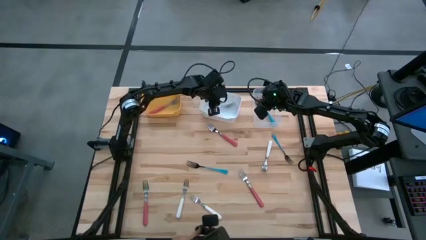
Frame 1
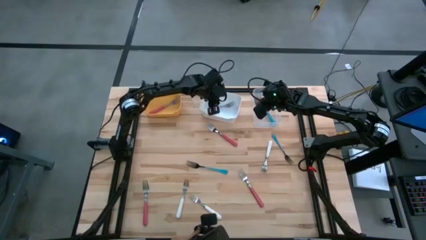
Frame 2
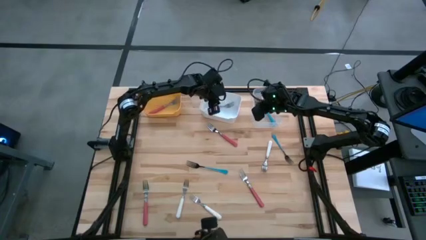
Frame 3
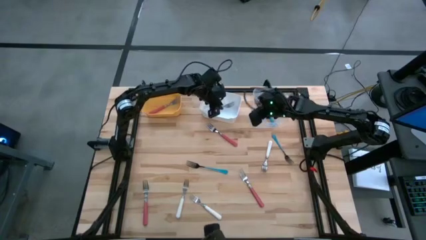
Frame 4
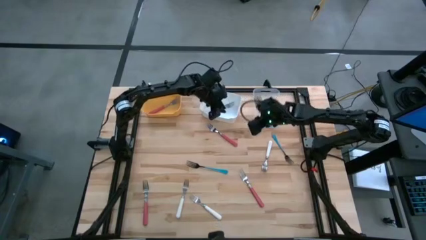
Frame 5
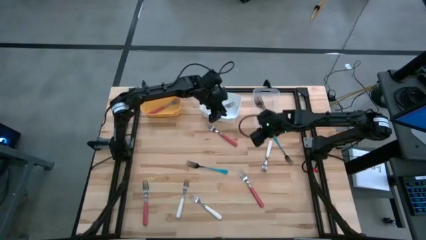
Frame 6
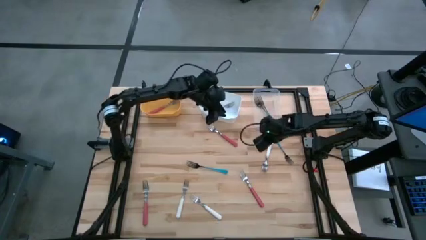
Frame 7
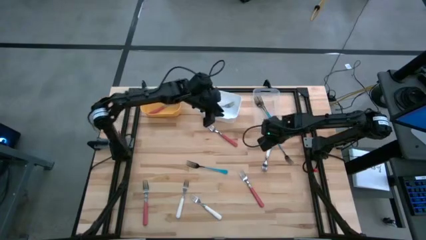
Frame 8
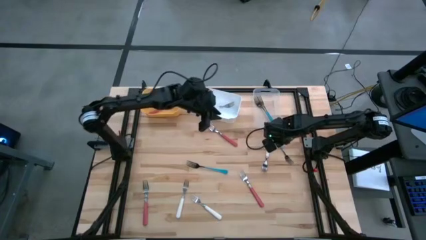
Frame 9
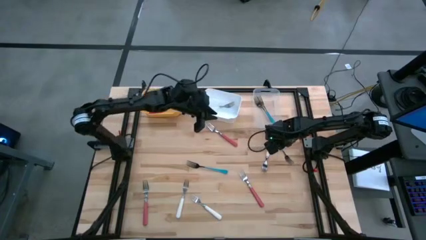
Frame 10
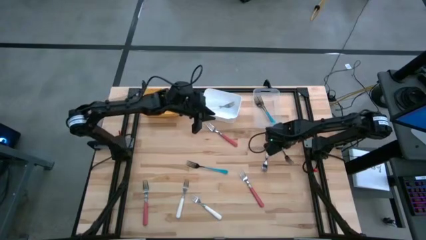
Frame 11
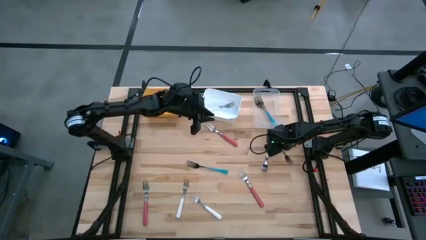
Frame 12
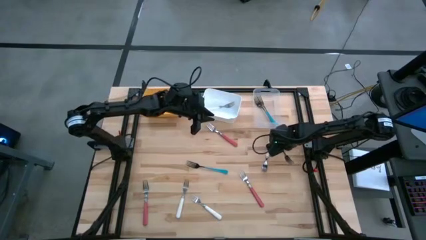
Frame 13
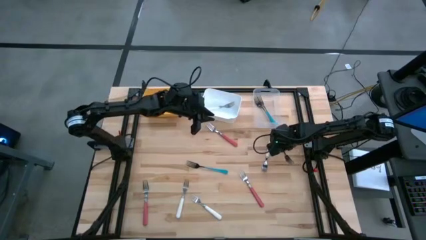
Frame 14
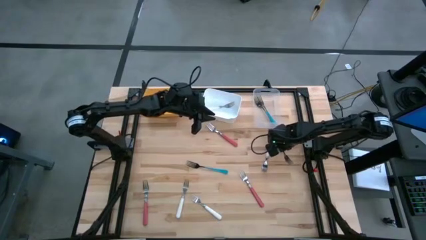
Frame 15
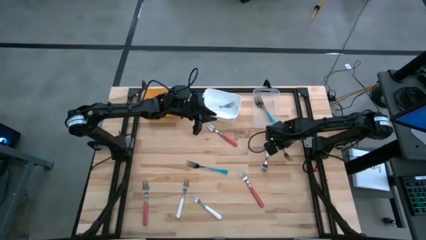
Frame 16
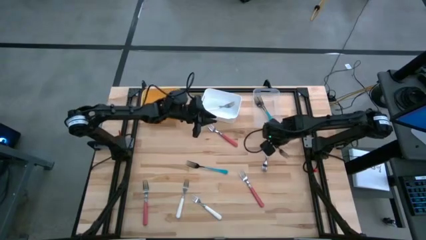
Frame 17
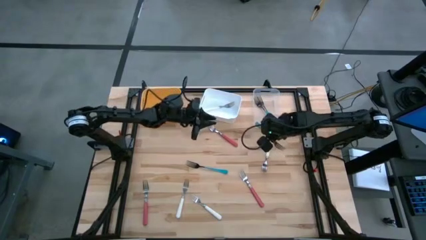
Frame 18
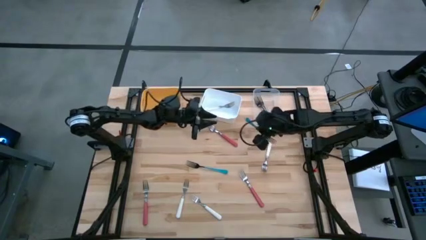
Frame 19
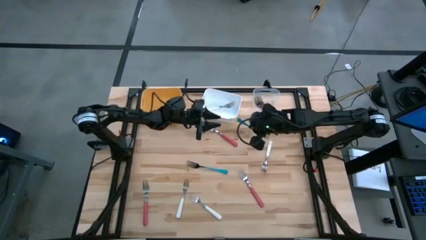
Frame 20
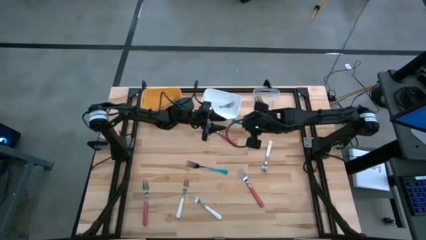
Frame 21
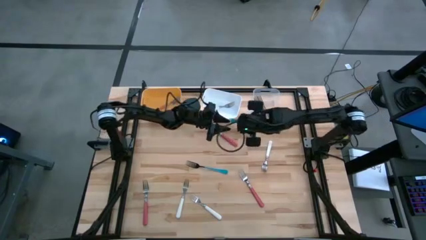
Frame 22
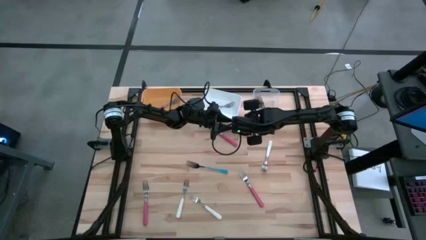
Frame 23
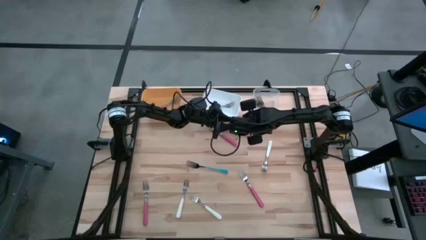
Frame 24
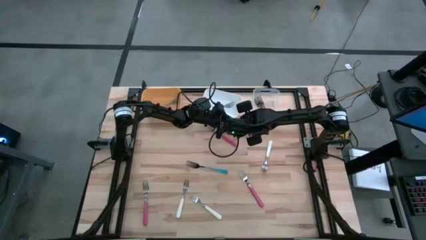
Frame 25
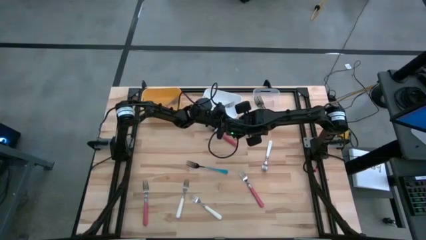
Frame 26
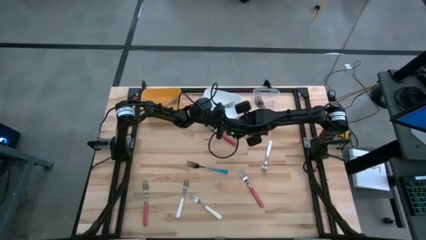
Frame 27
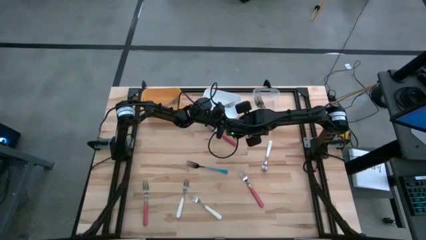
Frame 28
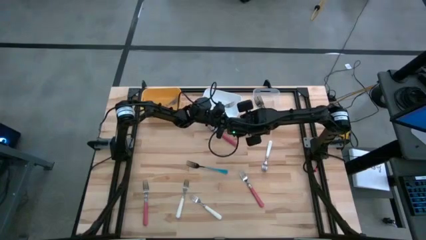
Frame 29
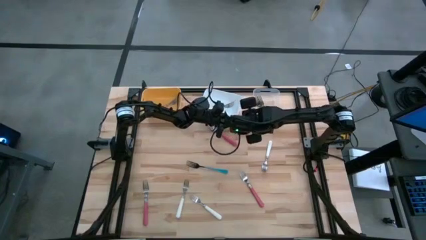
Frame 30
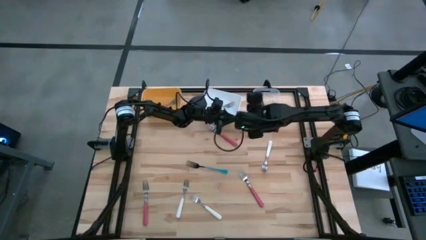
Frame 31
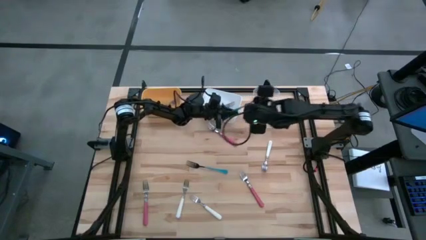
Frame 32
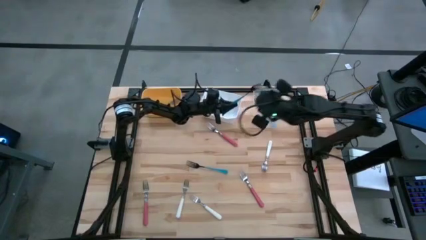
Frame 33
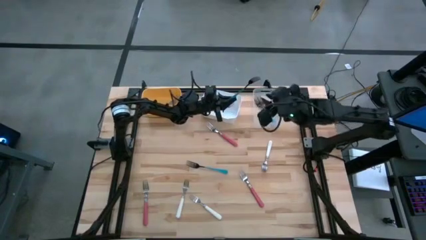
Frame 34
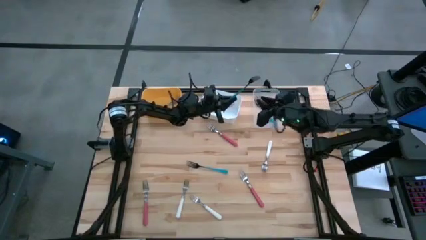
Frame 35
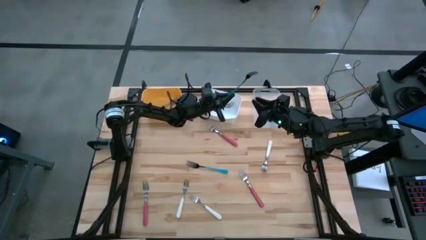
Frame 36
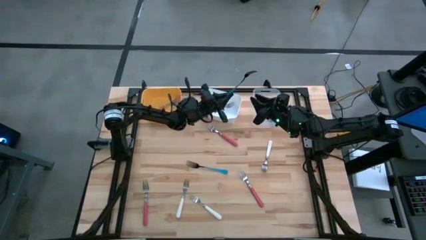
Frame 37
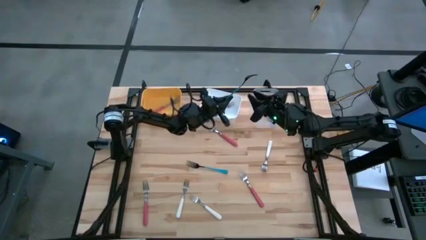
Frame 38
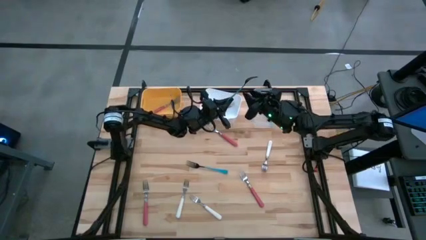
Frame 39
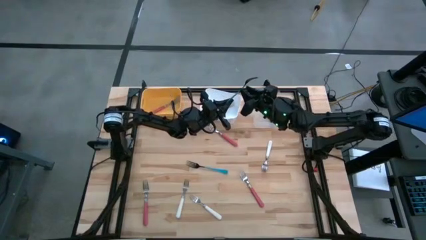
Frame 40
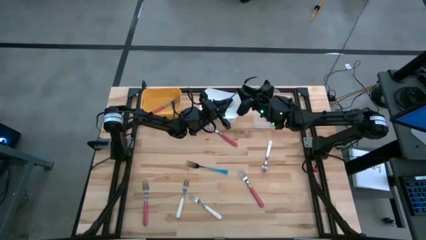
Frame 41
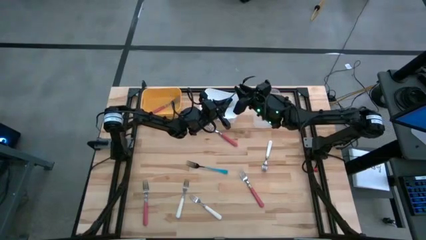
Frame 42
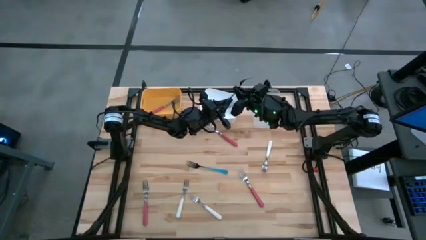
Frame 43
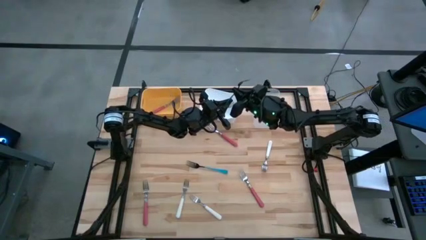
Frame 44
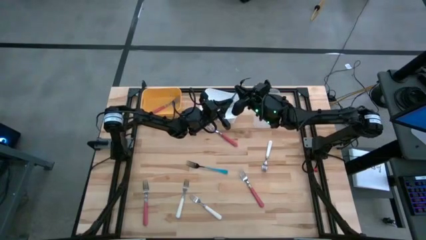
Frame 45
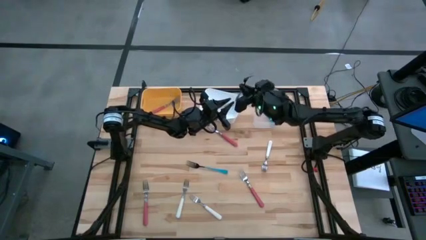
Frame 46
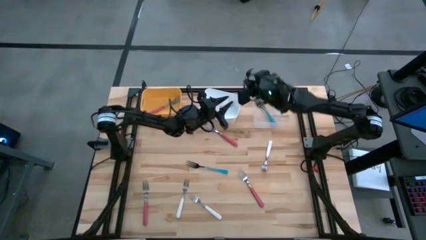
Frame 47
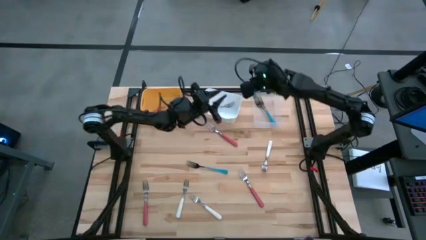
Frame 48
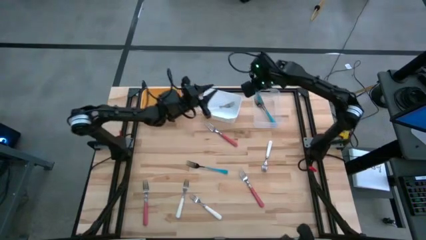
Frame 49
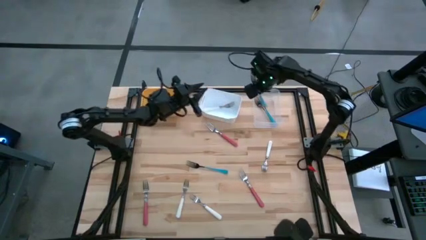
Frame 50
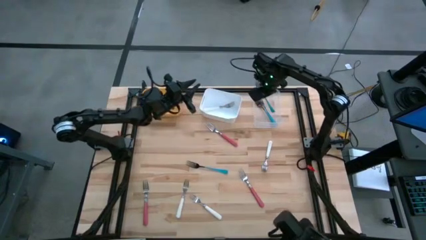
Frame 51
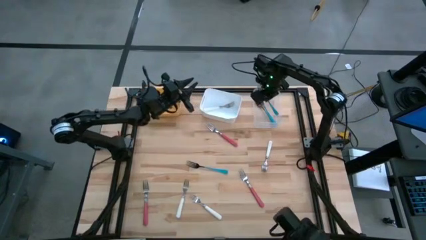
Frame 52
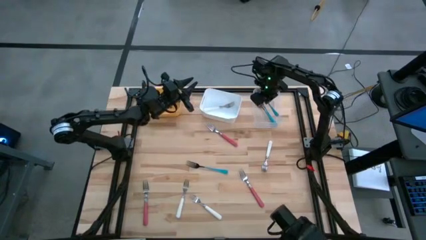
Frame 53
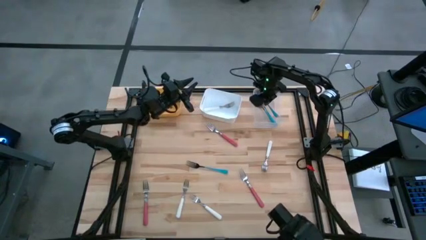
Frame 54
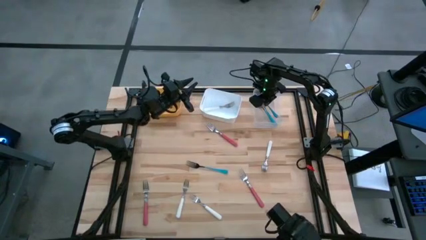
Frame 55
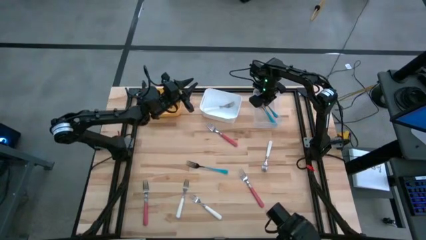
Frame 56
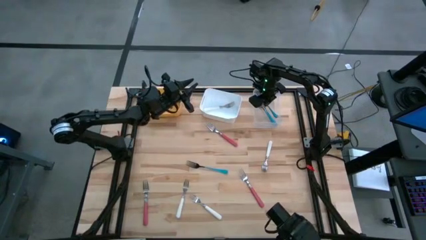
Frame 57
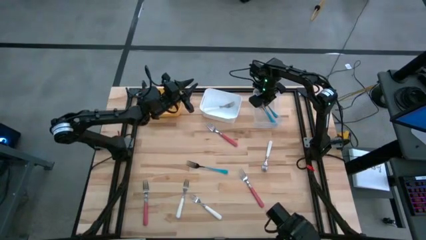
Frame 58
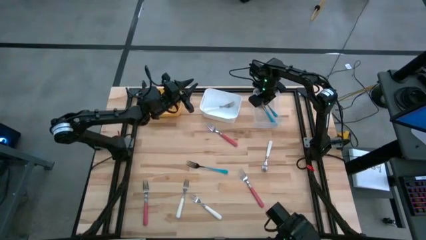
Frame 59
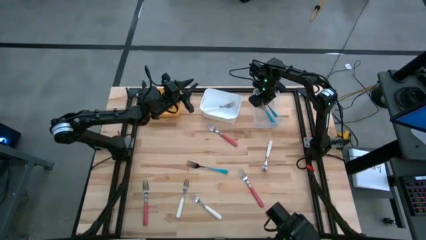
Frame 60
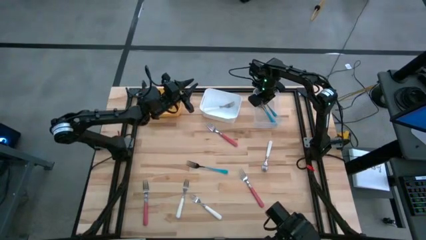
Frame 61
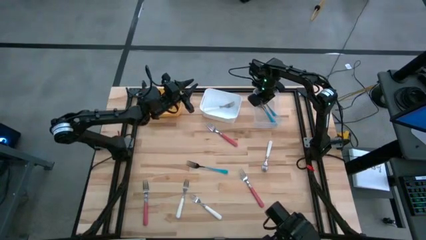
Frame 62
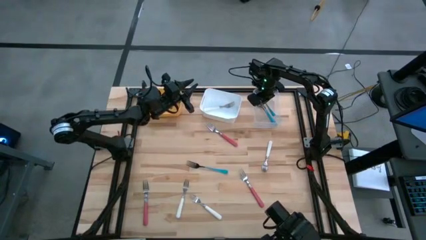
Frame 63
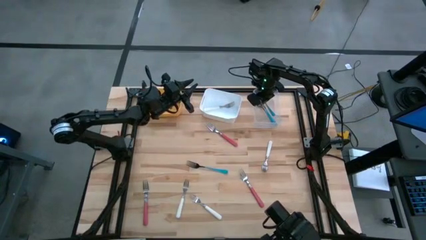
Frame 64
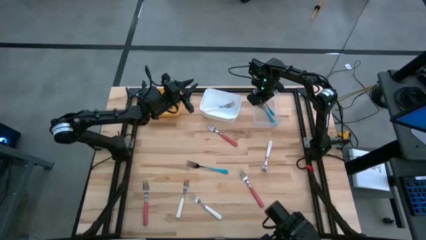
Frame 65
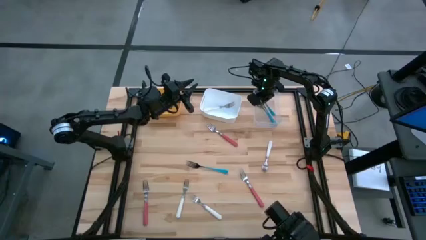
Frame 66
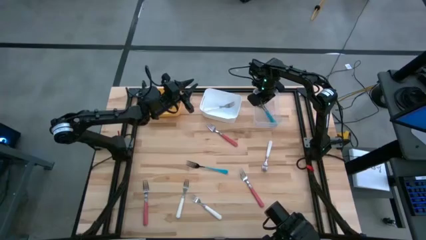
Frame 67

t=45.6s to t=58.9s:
Task: Sort silverware by color (type)
Put the blue fork into the transparent bin
